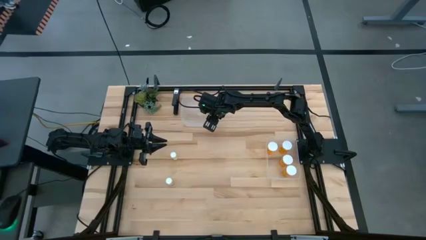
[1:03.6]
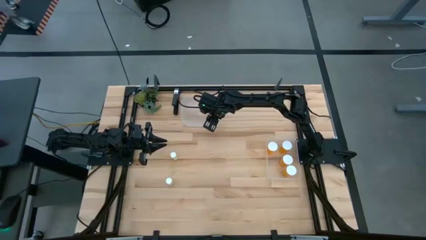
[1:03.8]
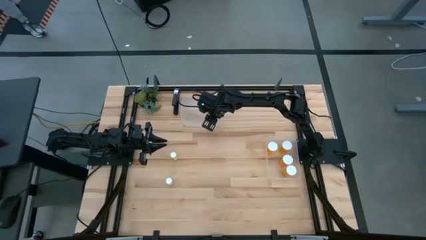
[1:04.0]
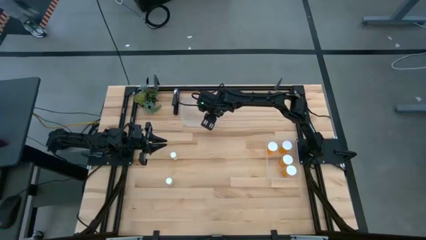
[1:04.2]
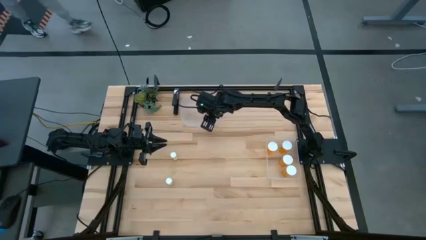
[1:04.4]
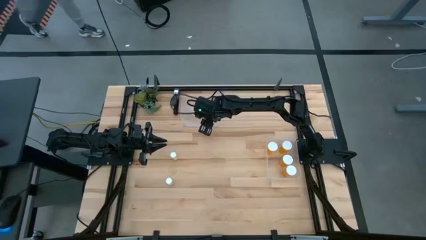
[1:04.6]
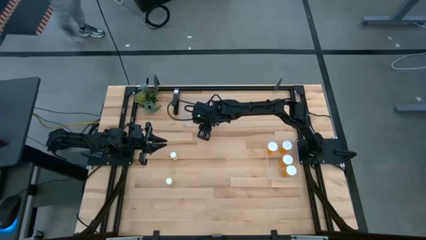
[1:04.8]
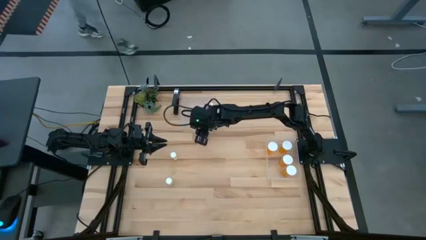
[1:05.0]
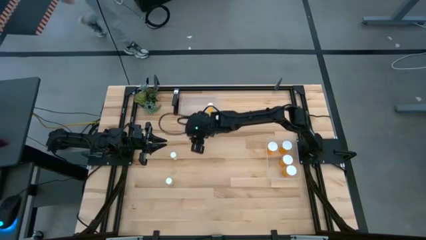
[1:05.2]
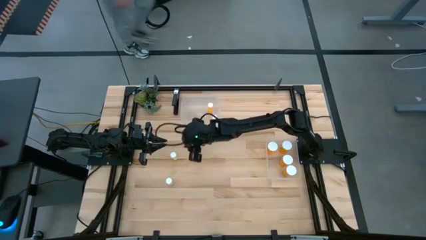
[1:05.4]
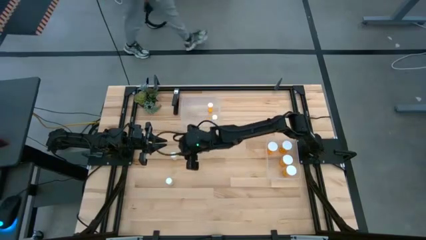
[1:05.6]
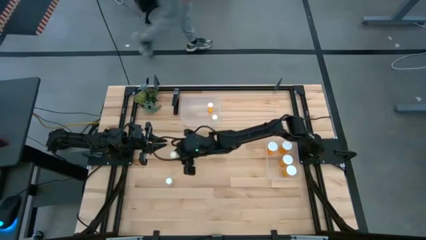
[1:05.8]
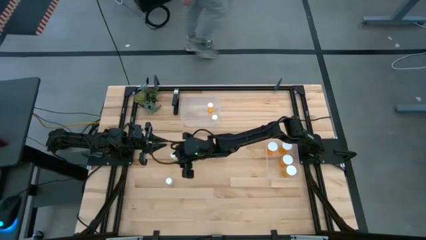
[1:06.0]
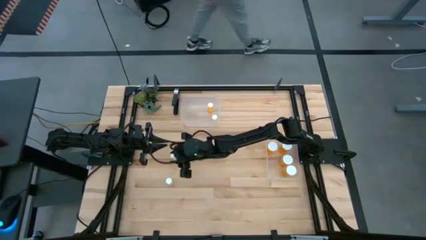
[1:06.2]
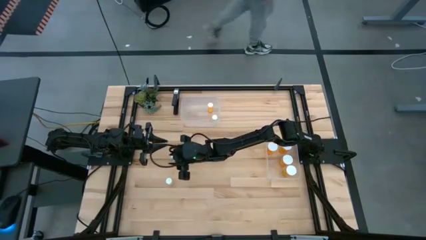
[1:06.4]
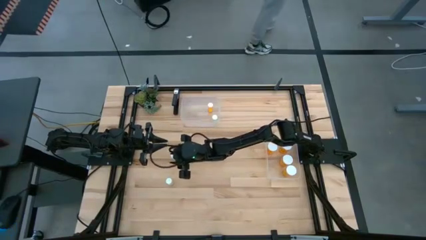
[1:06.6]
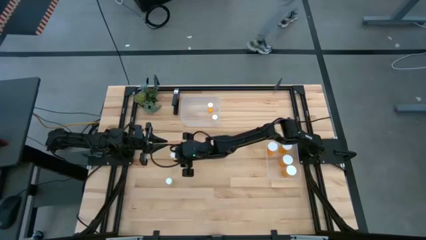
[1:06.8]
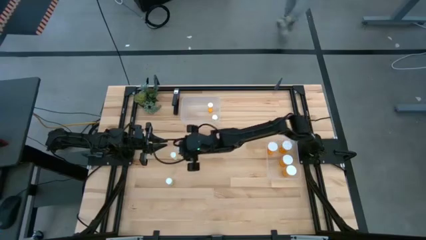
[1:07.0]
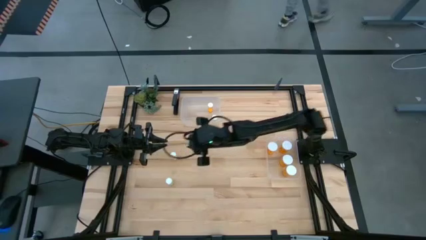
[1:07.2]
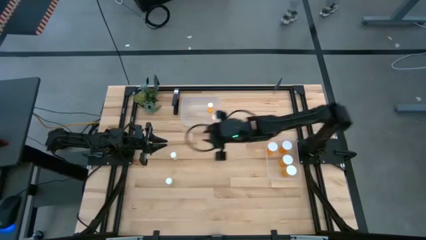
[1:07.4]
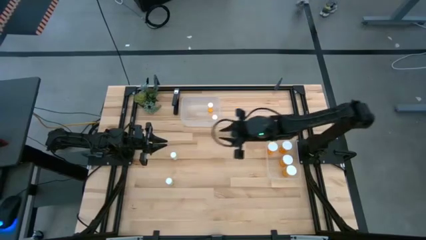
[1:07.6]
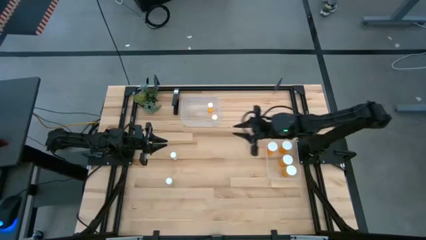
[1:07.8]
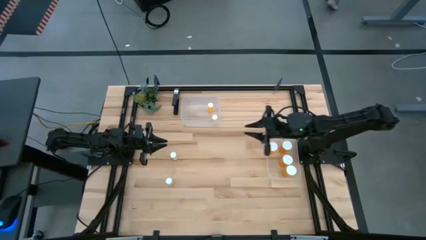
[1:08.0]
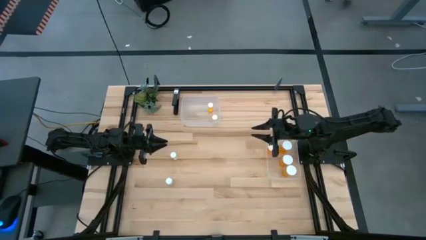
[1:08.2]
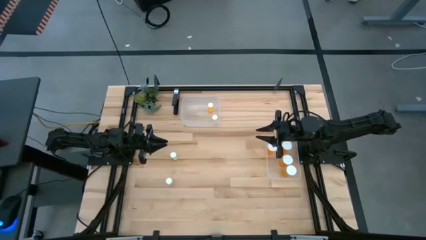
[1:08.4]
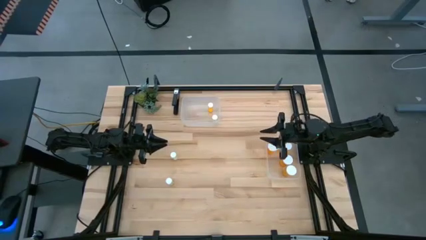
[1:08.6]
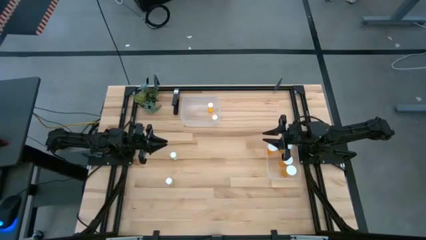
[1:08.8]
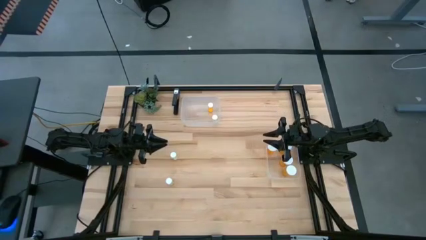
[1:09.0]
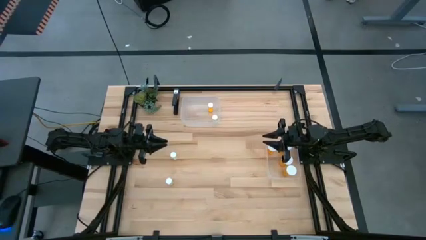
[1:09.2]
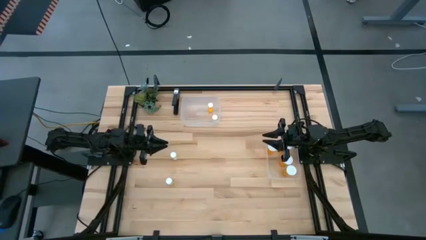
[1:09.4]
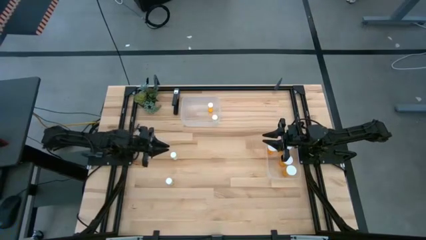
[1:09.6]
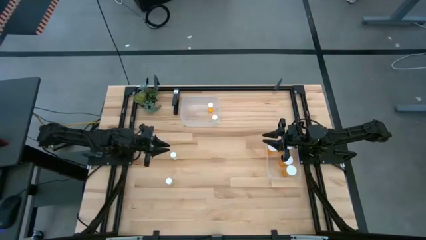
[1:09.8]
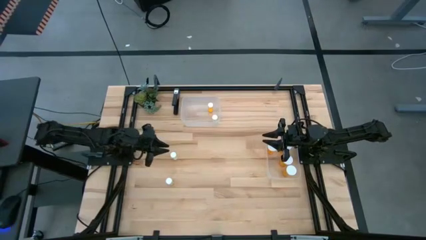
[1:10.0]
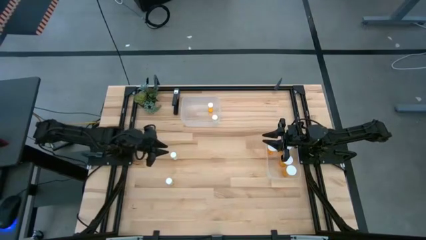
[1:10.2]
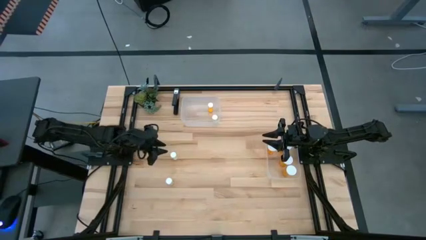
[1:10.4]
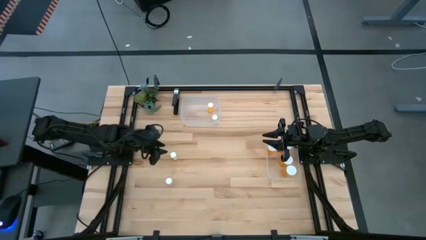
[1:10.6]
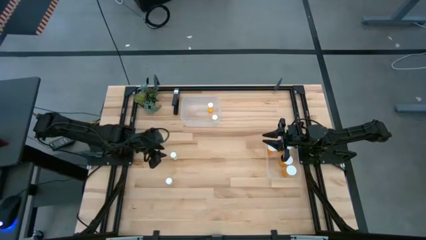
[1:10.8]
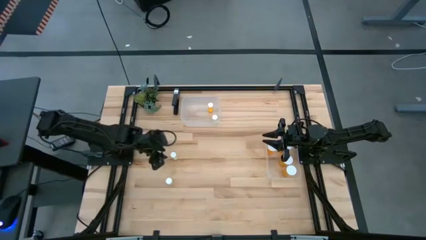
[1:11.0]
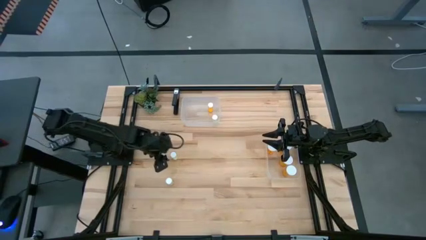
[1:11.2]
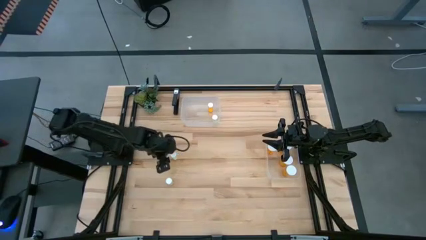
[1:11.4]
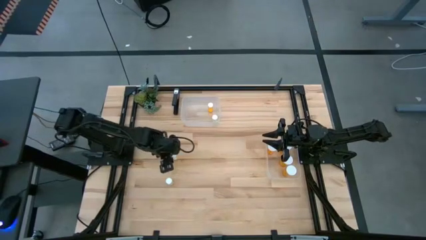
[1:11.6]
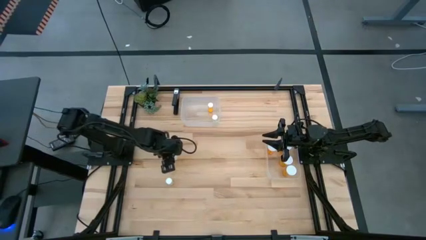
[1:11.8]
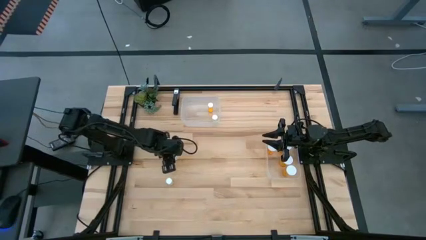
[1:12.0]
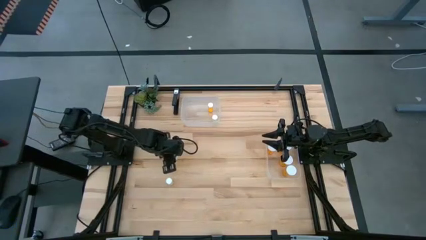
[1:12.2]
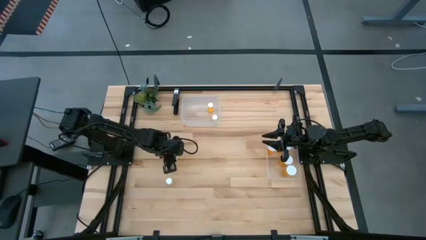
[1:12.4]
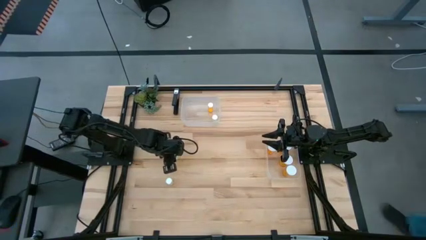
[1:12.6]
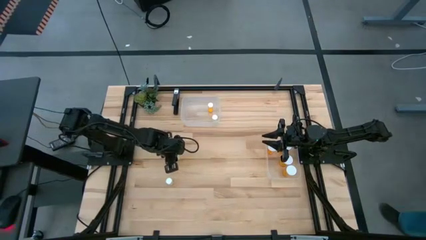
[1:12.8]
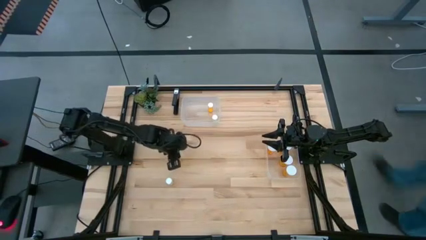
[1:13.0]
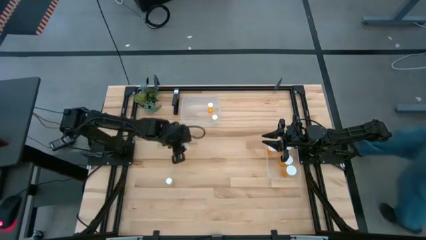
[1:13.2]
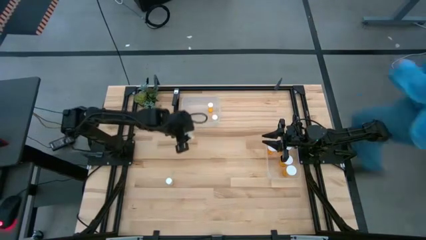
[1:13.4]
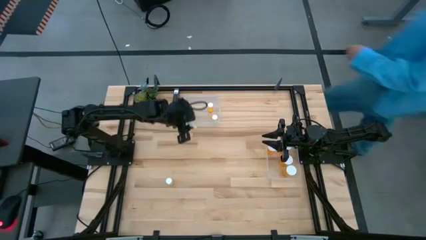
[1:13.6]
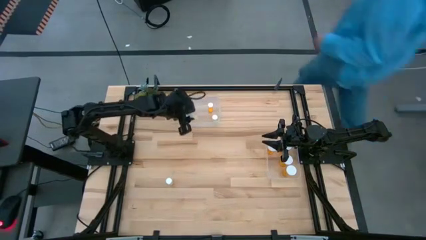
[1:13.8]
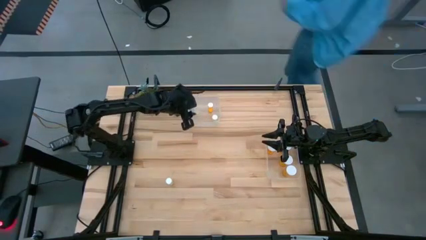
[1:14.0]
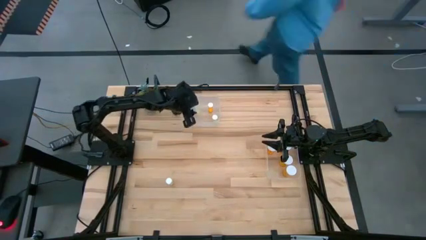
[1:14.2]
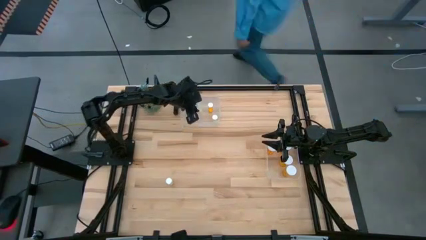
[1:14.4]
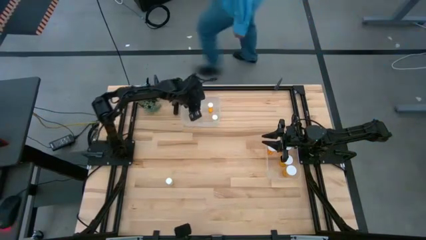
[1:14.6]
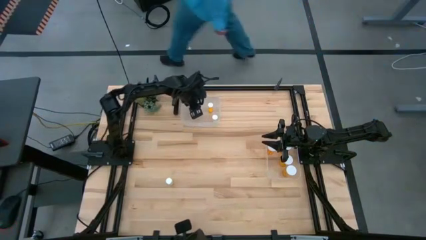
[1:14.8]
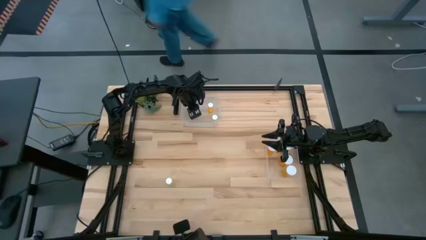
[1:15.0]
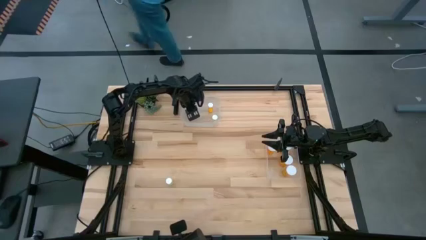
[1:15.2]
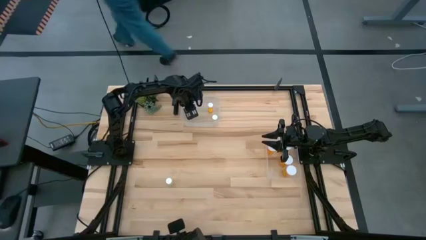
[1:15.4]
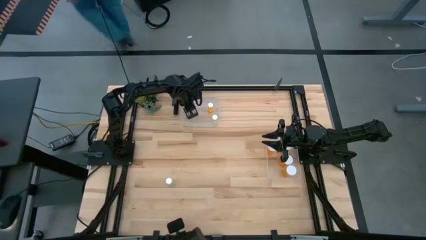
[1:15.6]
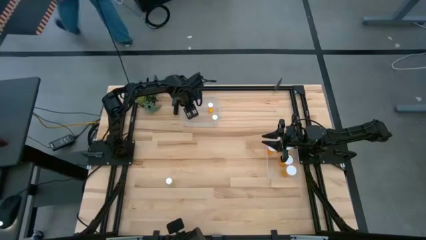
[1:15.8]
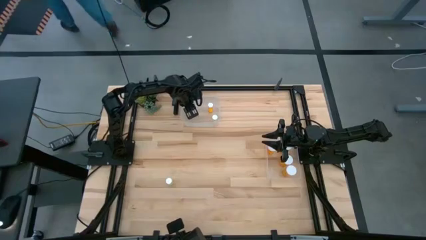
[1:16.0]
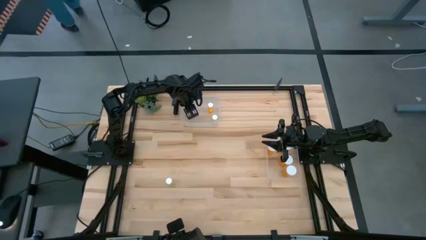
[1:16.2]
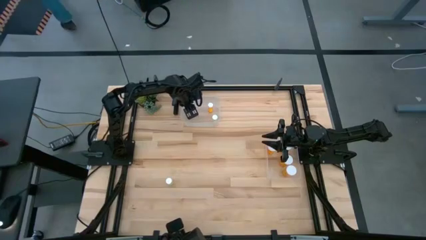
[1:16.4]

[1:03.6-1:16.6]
Task: Pick and place medicine bottles into bin by pill shape (circle, oval)
Put the small yellow pill bottle into the top transparent bin
